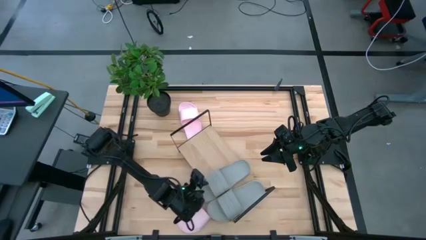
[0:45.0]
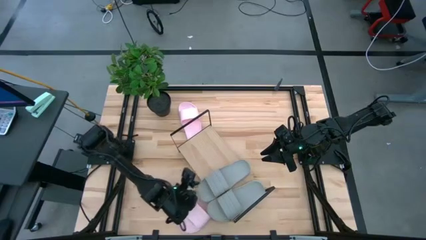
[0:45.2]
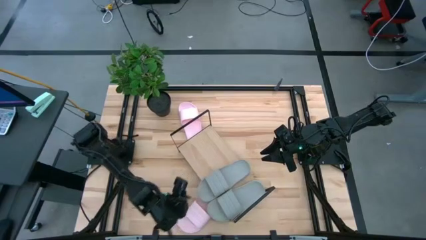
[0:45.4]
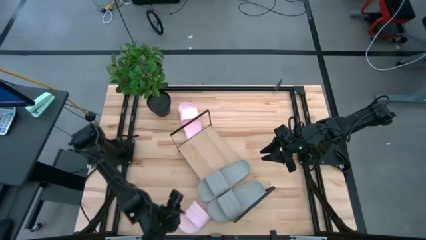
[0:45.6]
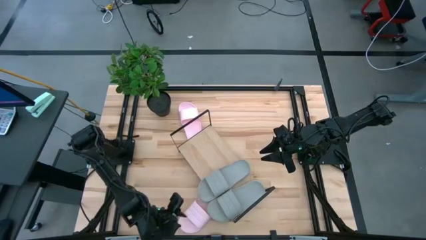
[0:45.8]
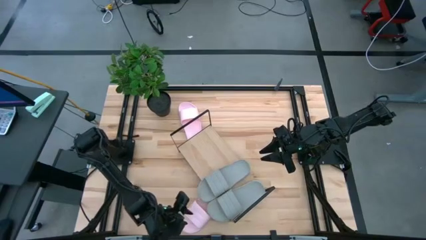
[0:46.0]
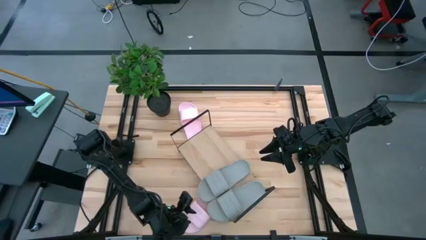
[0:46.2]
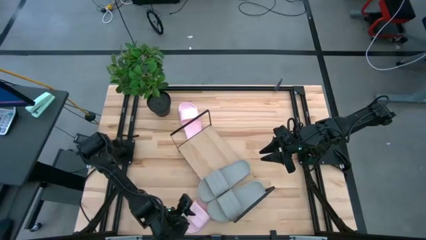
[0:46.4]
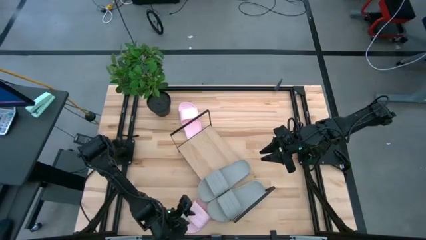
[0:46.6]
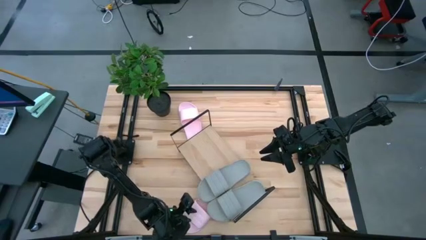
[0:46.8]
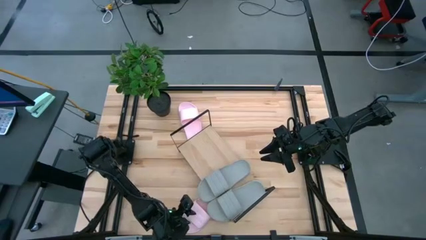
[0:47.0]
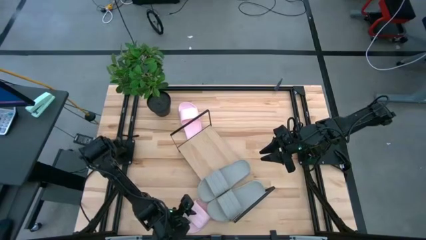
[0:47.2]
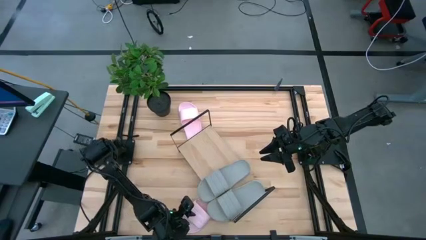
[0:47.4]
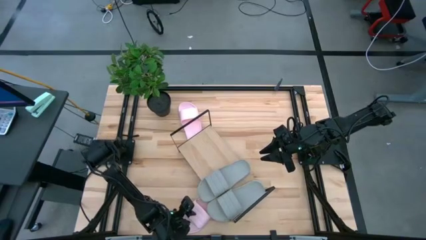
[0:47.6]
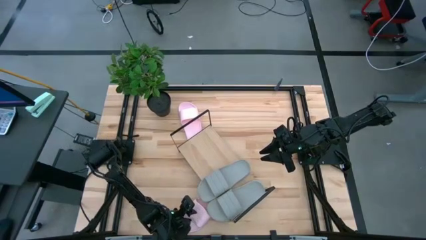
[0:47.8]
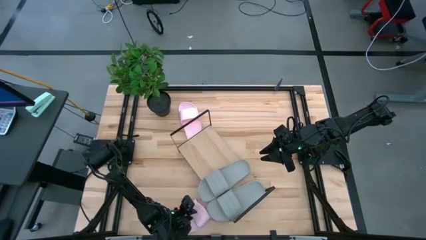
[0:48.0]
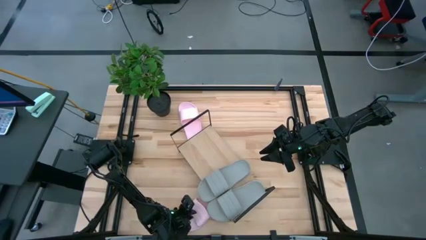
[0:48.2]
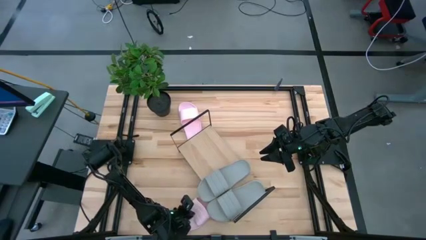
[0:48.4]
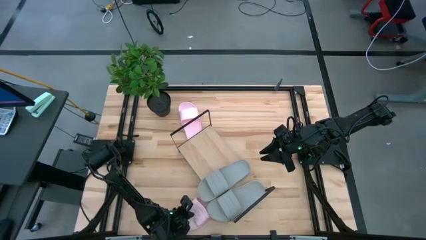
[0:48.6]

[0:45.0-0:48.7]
Task: Pick and place slides into the shelf
Put the bottom pink slide on the shelf

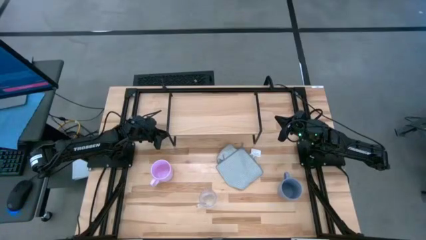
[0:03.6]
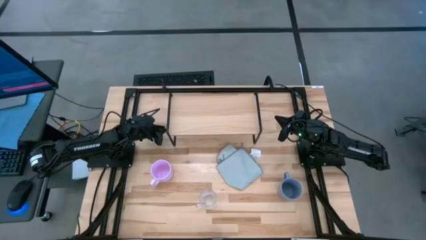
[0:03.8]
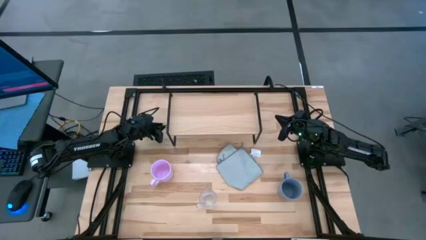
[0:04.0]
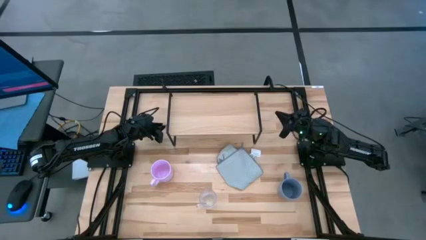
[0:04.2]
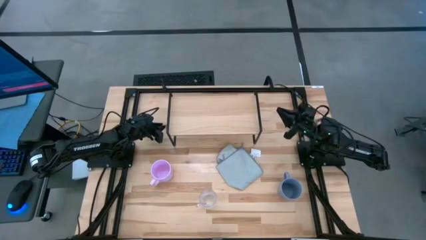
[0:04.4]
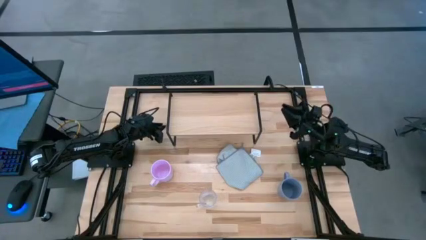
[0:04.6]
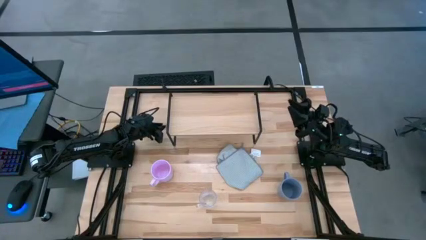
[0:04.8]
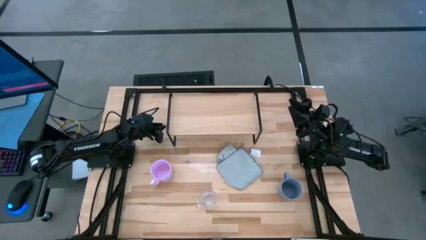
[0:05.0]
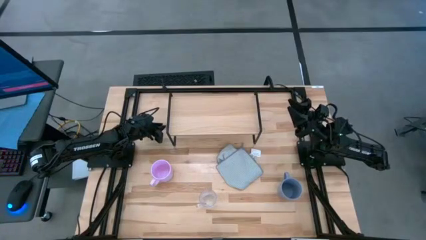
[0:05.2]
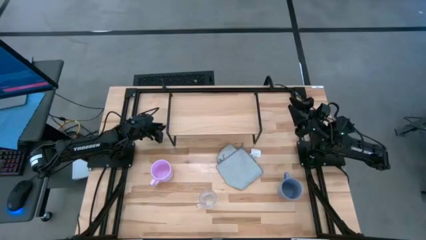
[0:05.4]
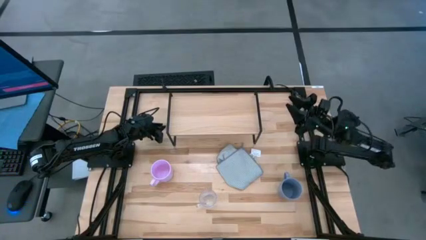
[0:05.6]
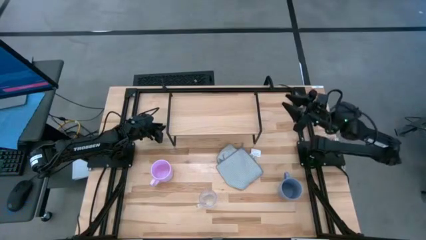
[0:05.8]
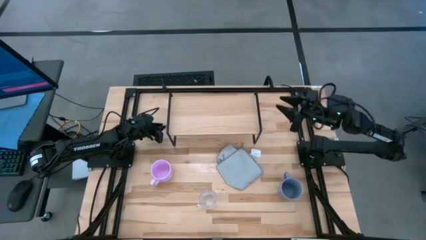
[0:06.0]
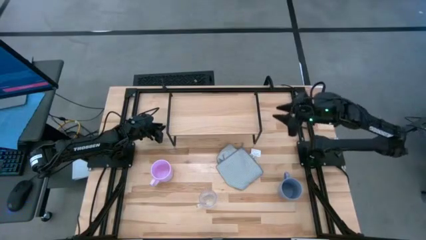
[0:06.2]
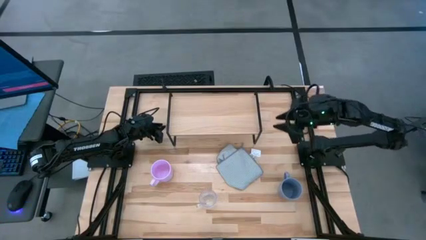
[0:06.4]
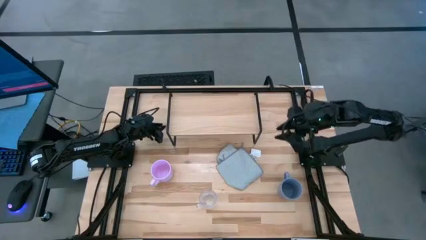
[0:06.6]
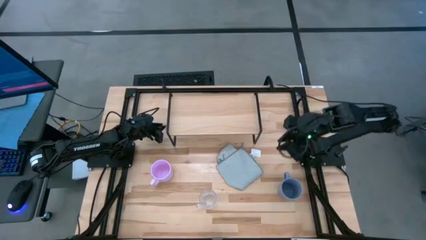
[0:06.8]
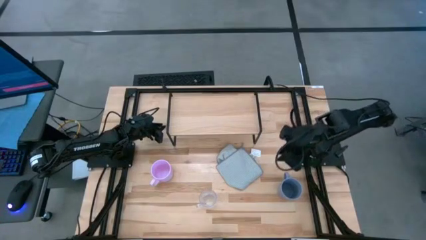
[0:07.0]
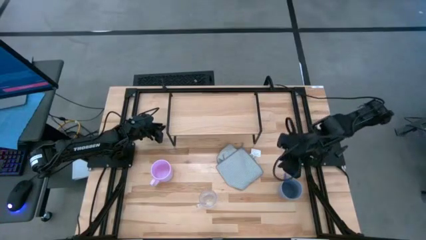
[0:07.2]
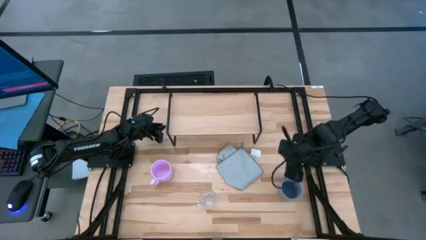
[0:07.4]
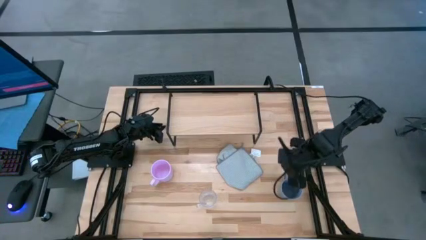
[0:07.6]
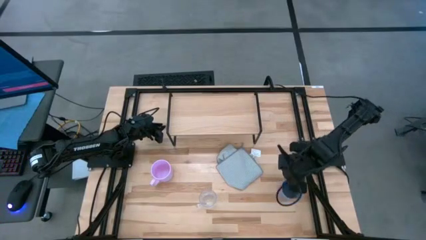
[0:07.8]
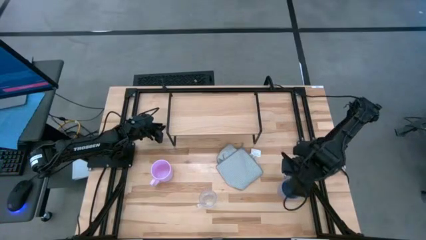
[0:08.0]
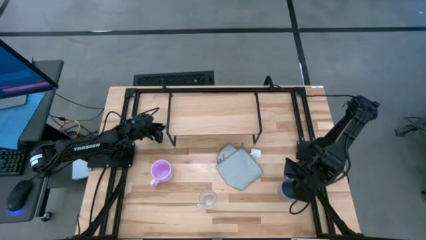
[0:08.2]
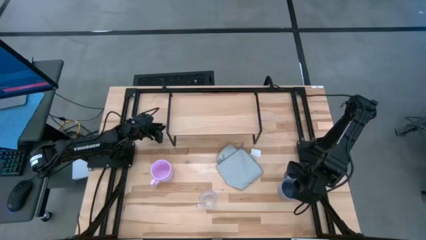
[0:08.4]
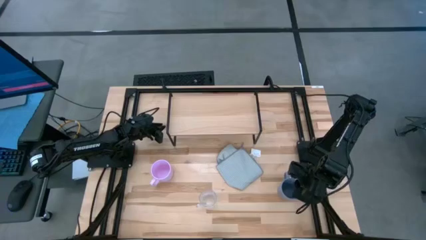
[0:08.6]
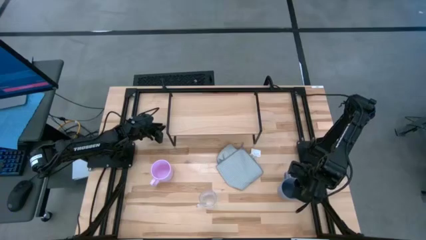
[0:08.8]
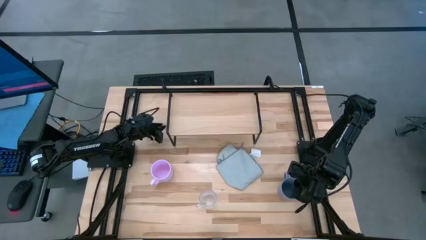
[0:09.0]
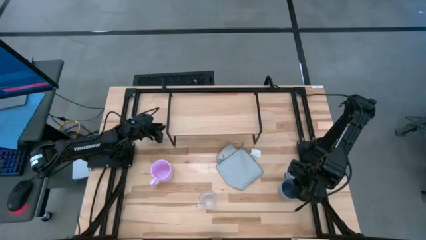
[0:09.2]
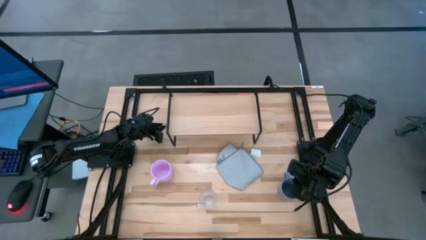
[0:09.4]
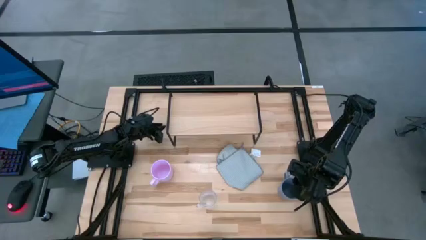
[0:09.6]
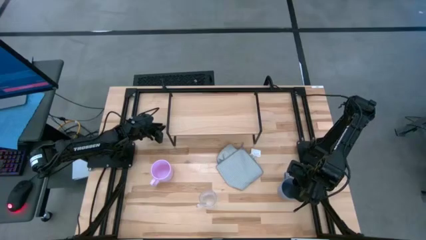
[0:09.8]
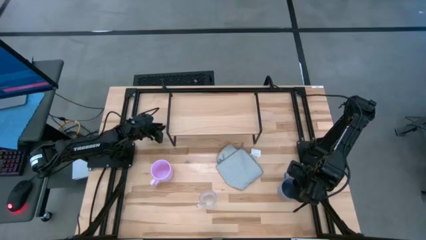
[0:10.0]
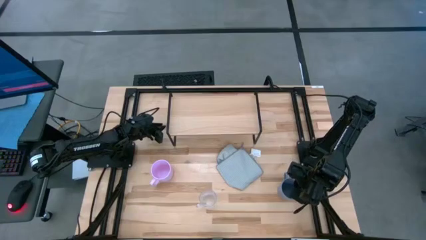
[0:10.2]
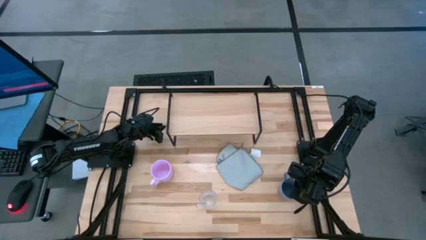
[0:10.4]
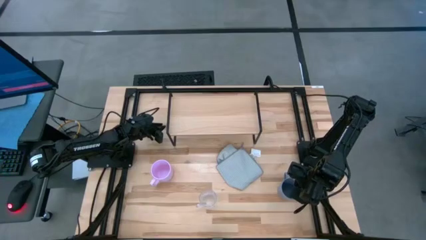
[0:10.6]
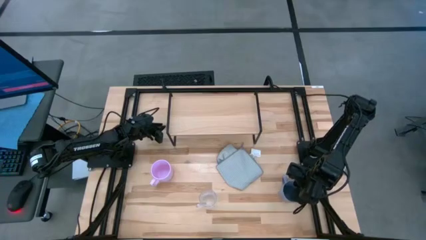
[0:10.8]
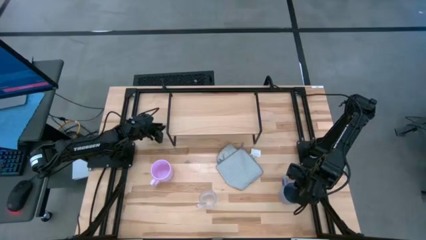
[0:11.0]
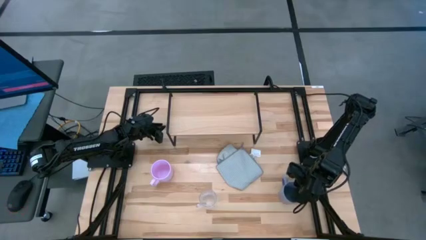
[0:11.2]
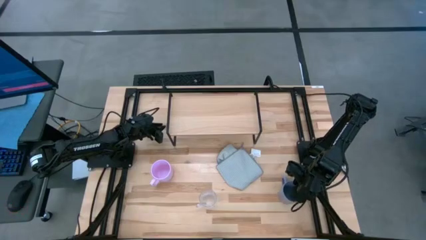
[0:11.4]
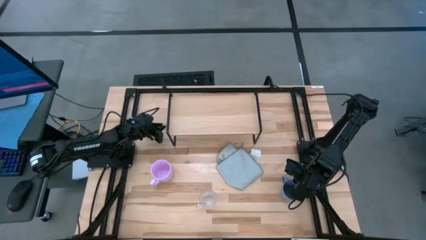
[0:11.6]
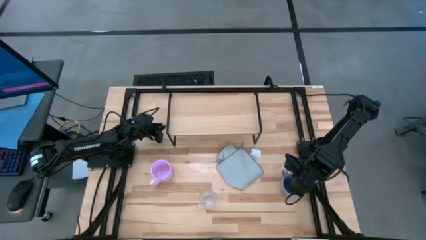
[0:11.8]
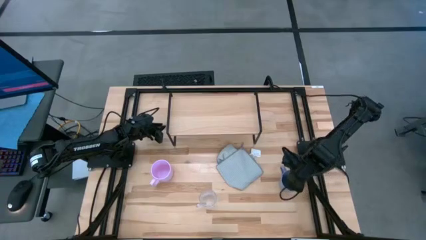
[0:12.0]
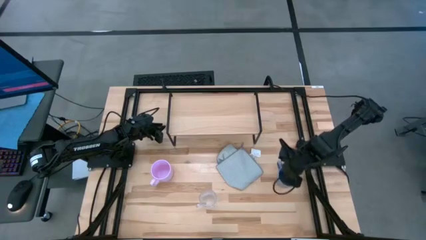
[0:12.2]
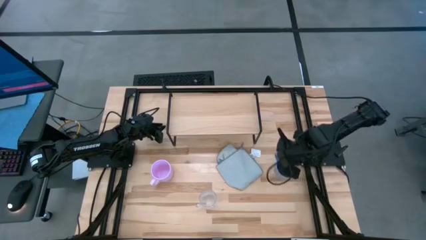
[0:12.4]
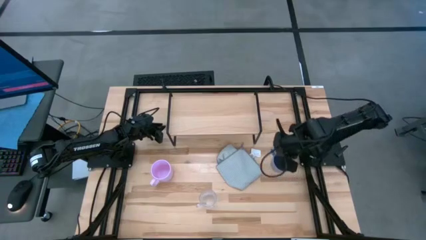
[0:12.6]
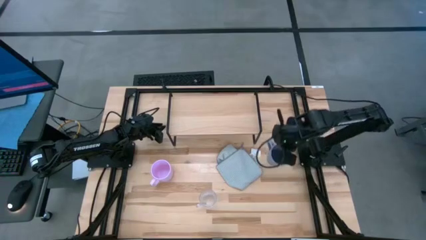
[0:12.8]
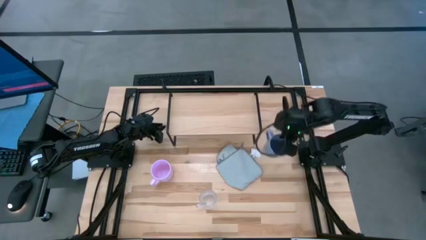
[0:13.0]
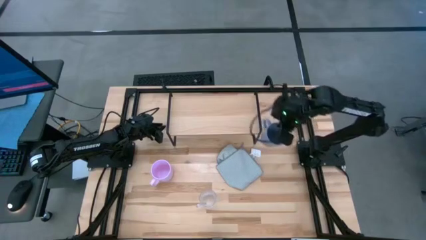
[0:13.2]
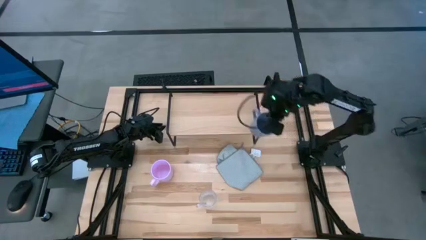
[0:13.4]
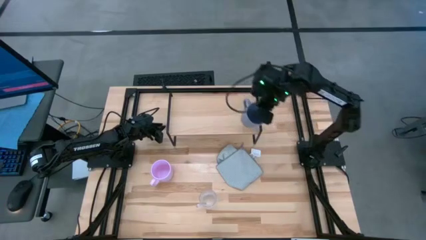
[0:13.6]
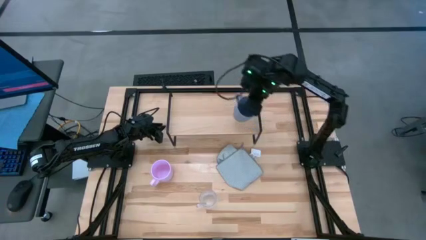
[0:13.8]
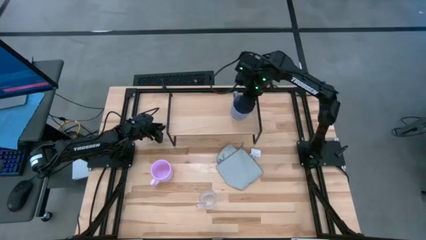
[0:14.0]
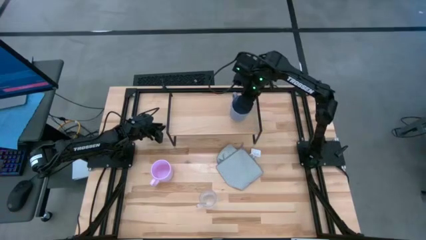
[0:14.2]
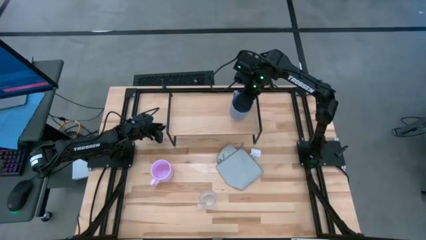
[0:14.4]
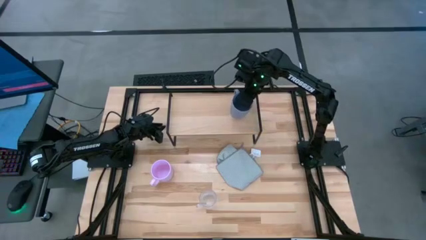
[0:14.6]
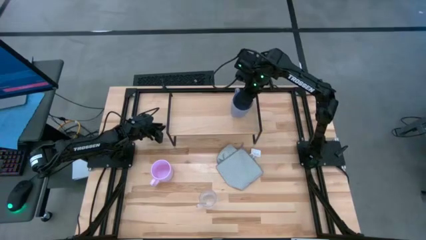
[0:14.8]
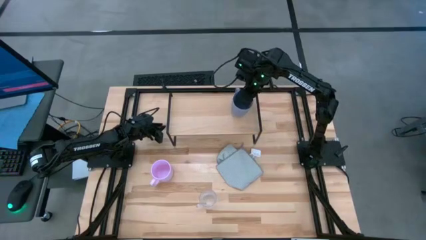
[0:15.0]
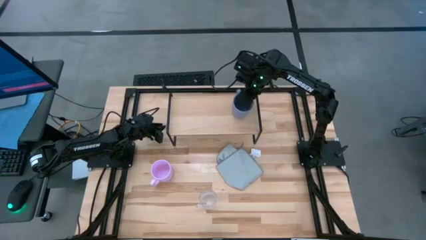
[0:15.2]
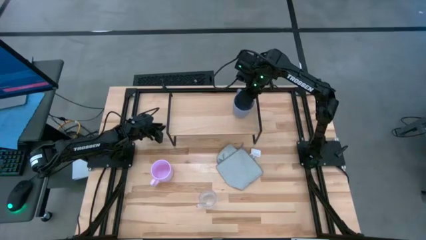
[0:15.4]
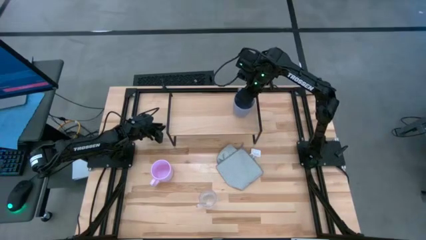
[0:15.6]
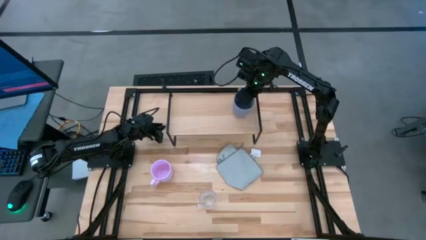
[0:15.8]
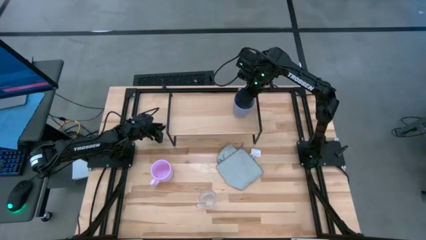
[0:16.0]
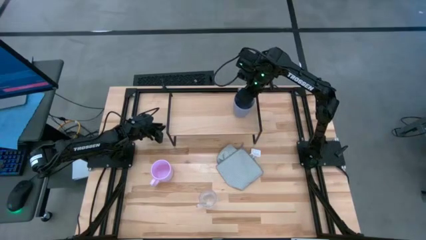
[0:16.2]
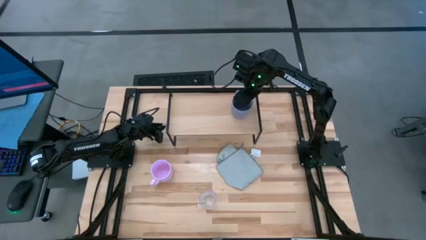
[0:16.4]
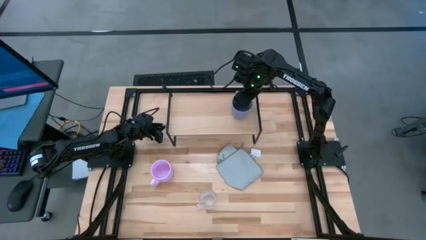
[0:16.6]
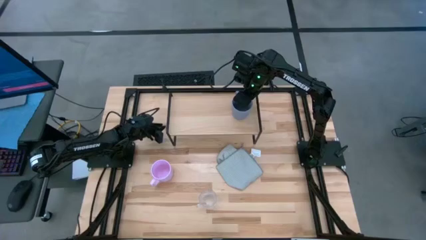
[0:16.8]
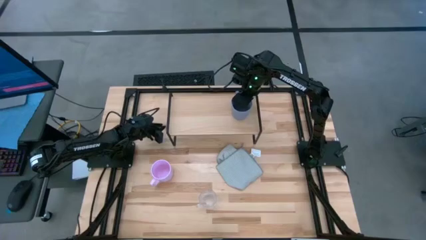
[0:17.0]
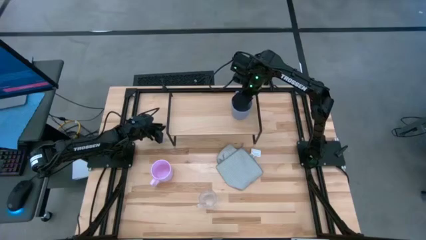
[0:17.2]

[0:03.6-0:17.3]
Task: Stack small to large cups/mugs on shelf
Put the blue mug on the shelf
